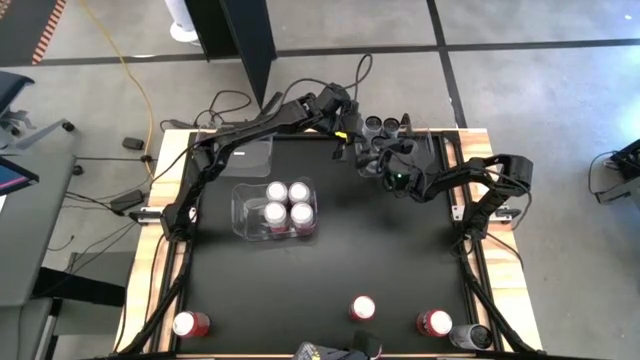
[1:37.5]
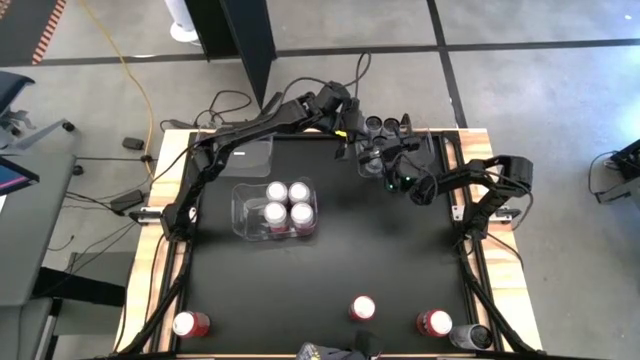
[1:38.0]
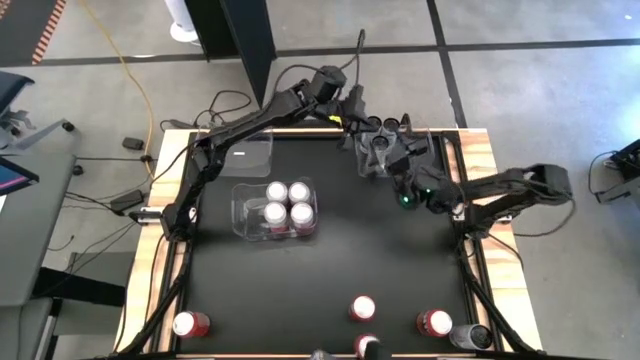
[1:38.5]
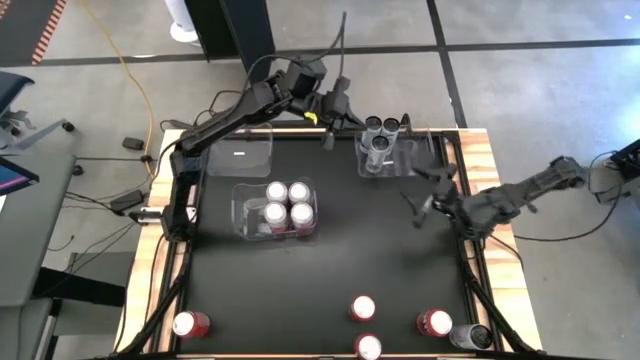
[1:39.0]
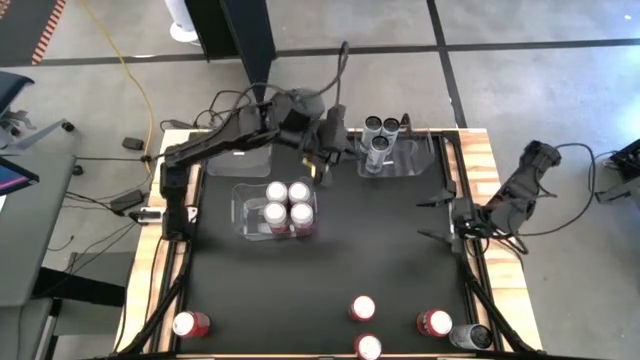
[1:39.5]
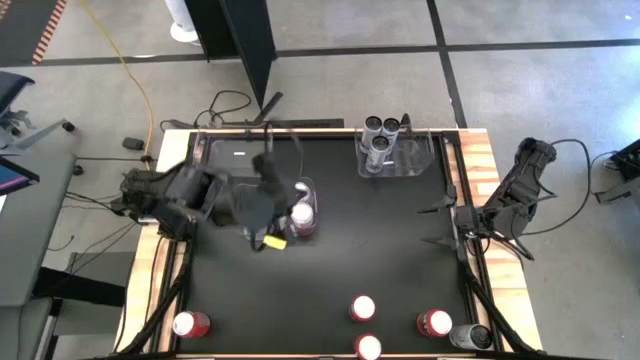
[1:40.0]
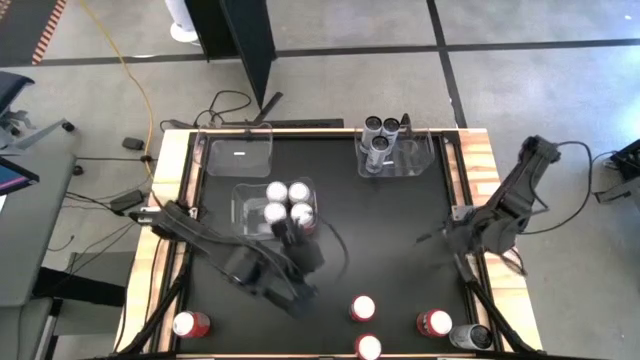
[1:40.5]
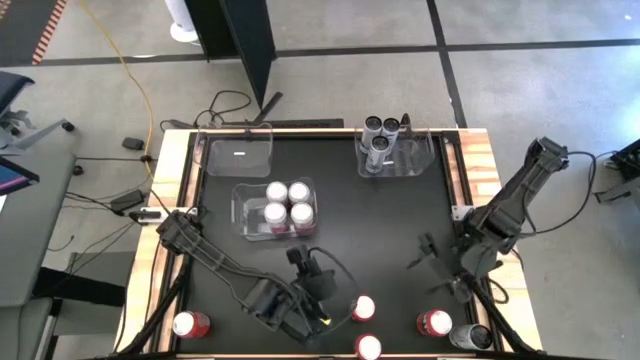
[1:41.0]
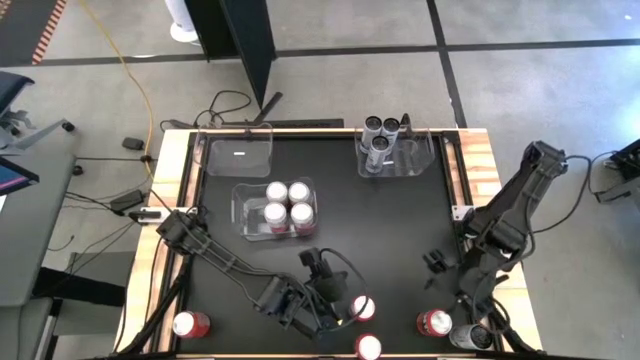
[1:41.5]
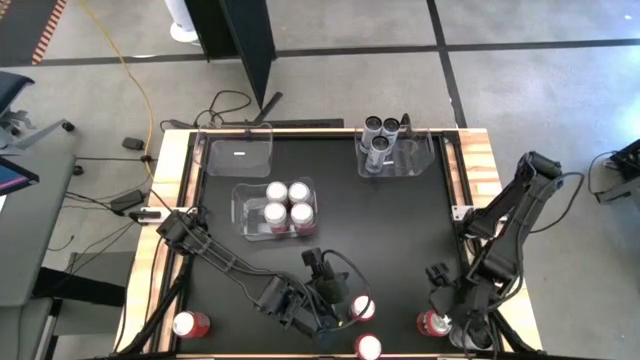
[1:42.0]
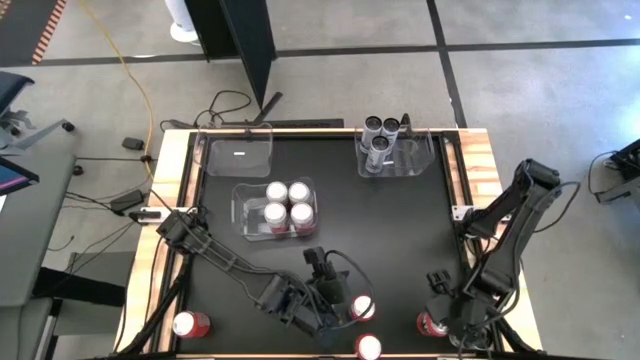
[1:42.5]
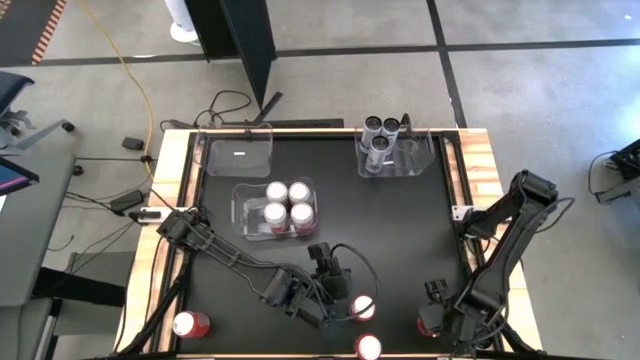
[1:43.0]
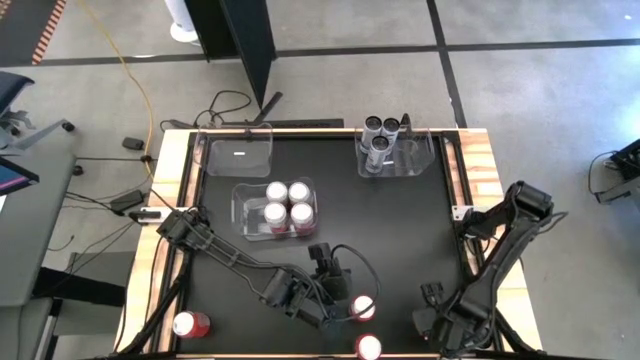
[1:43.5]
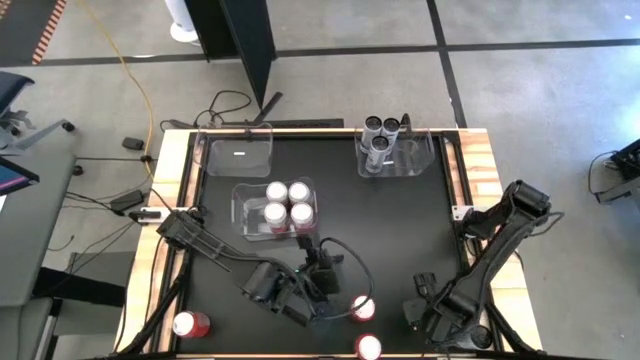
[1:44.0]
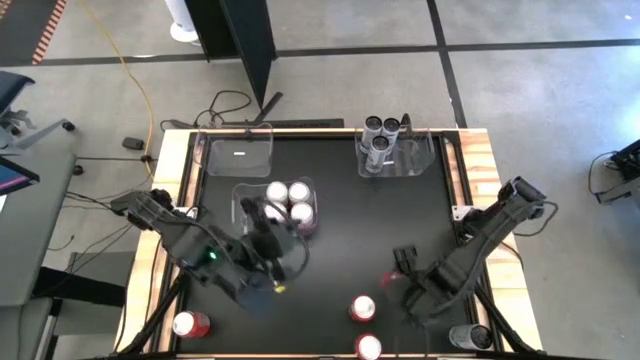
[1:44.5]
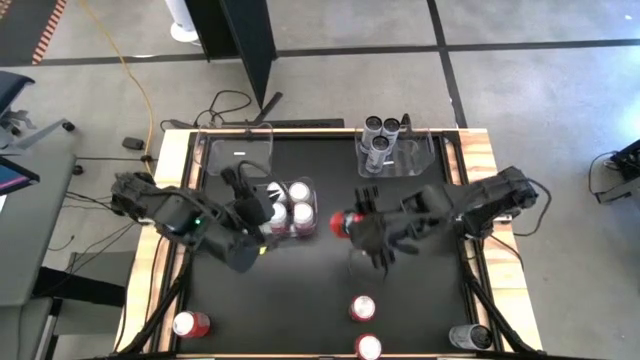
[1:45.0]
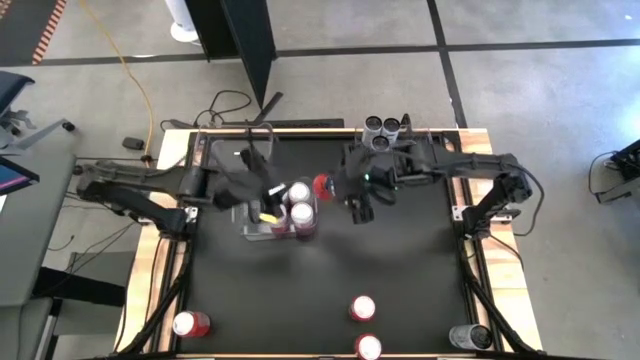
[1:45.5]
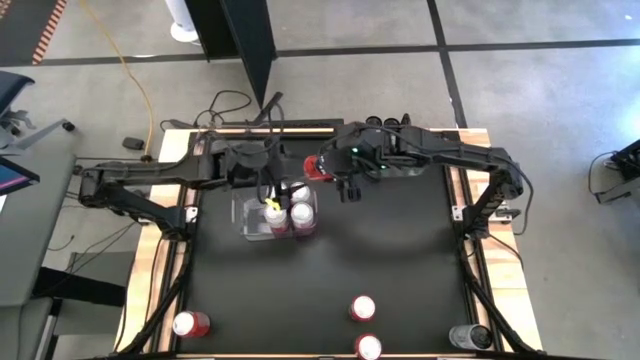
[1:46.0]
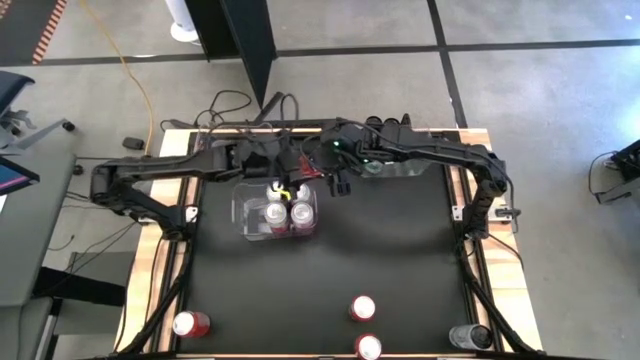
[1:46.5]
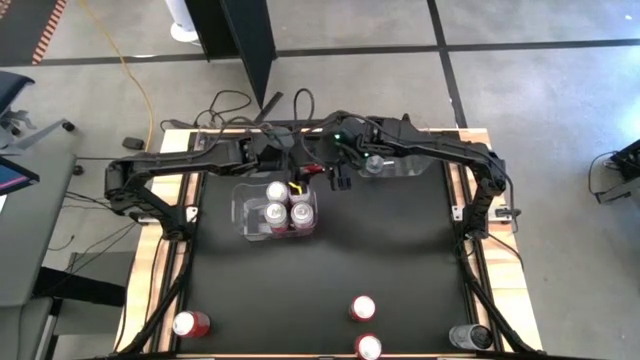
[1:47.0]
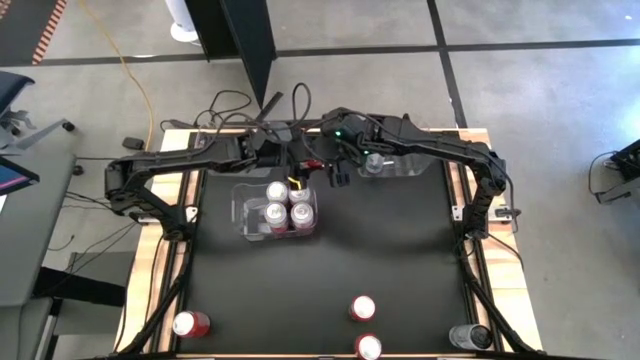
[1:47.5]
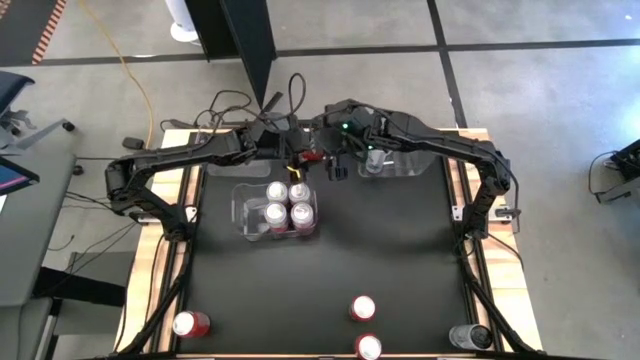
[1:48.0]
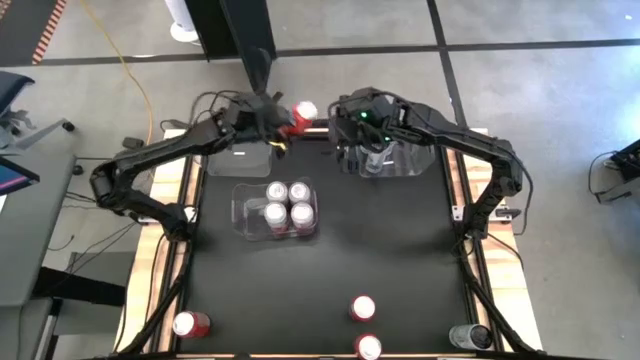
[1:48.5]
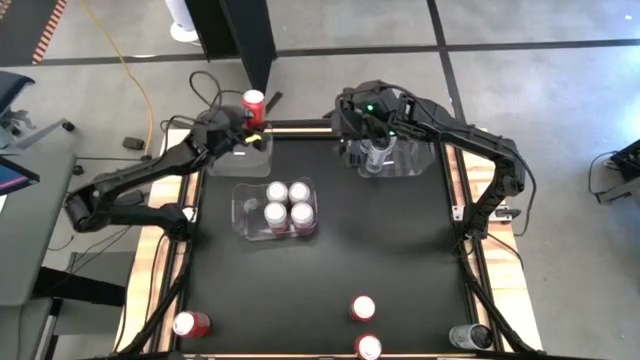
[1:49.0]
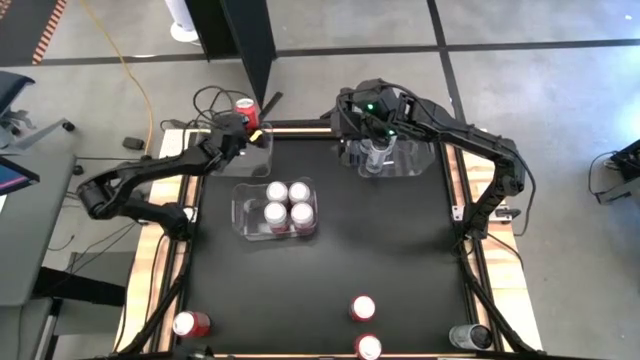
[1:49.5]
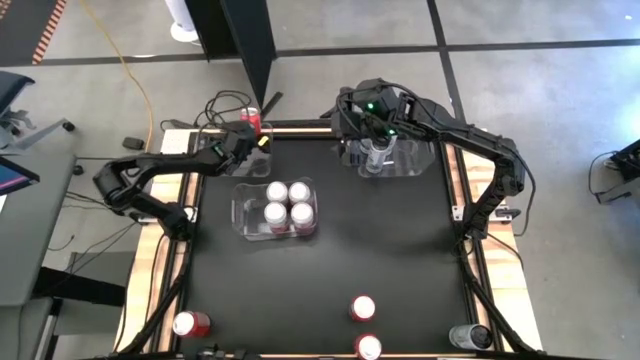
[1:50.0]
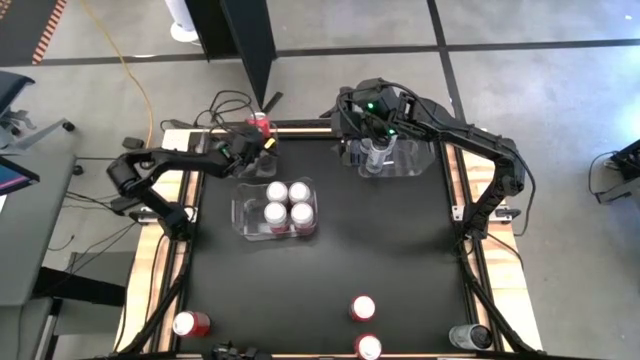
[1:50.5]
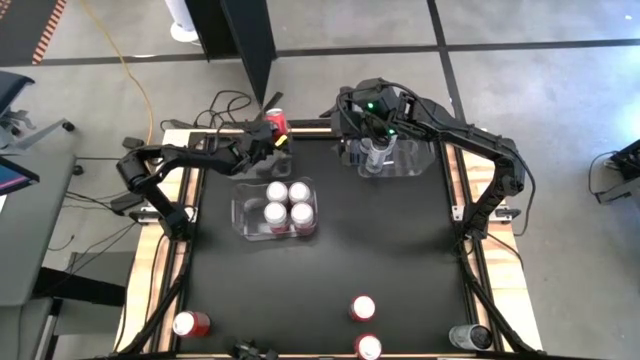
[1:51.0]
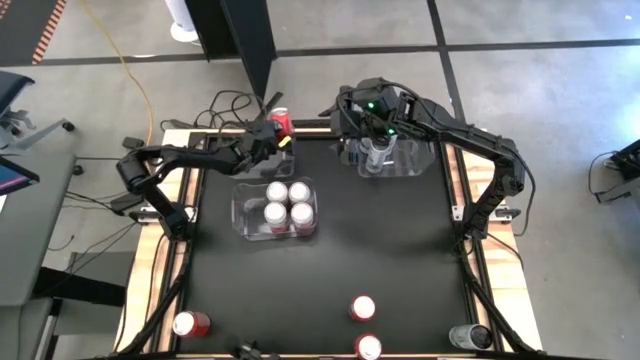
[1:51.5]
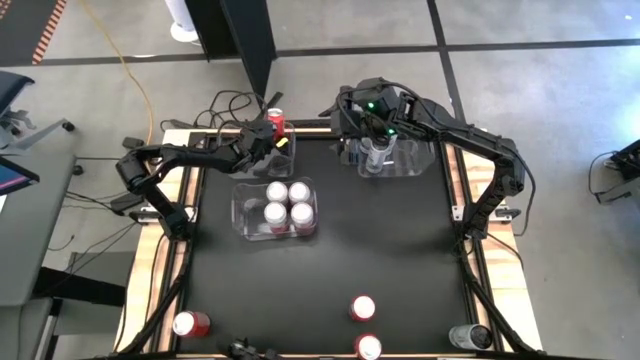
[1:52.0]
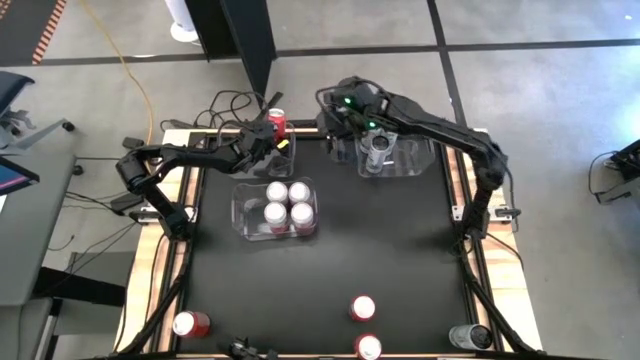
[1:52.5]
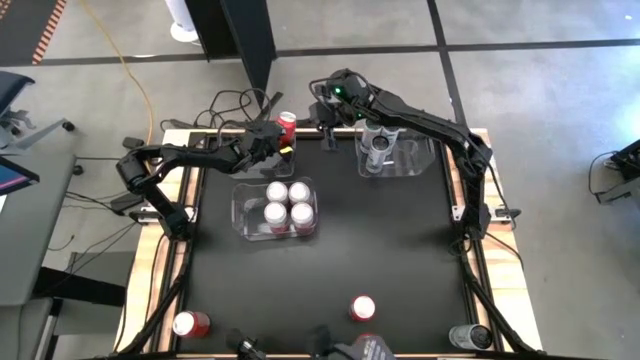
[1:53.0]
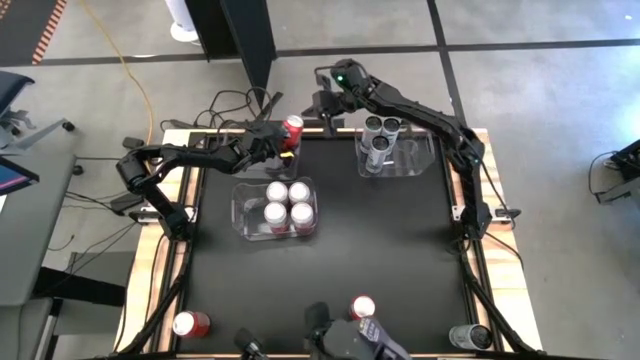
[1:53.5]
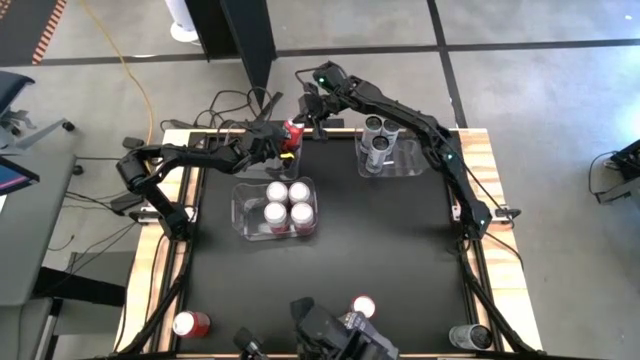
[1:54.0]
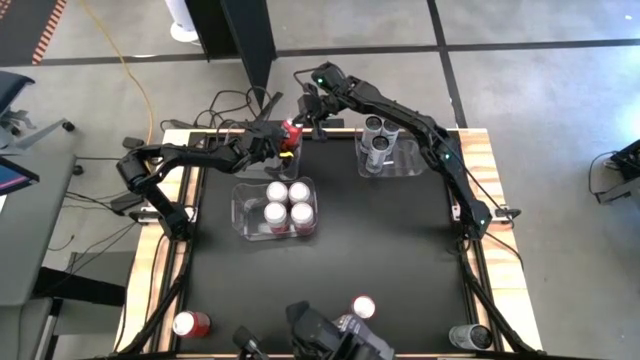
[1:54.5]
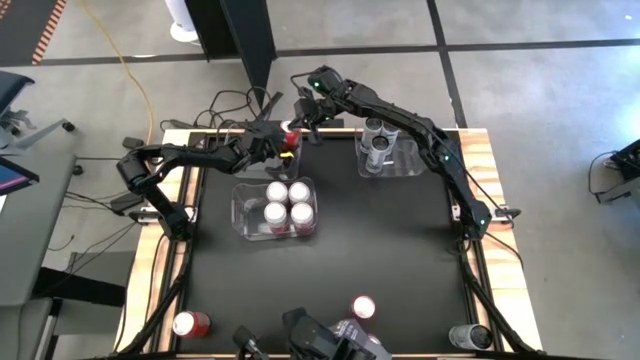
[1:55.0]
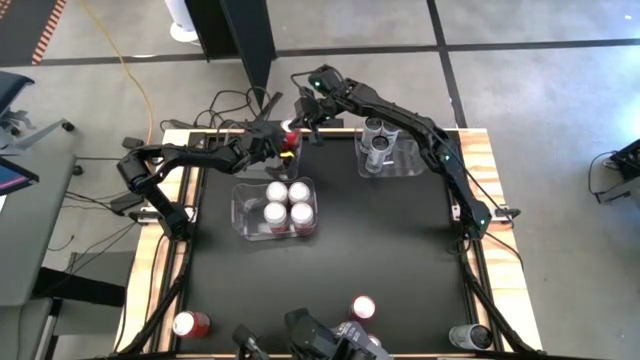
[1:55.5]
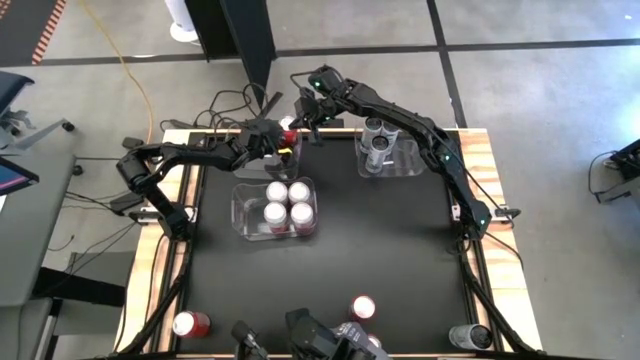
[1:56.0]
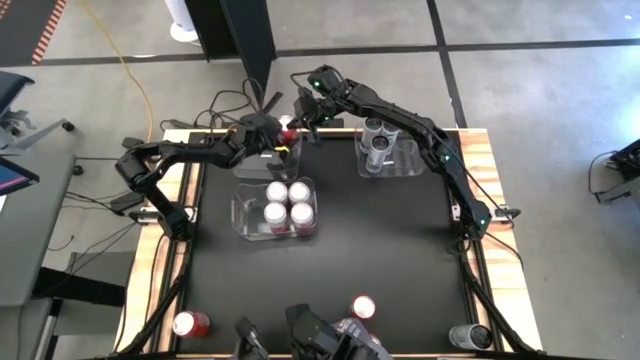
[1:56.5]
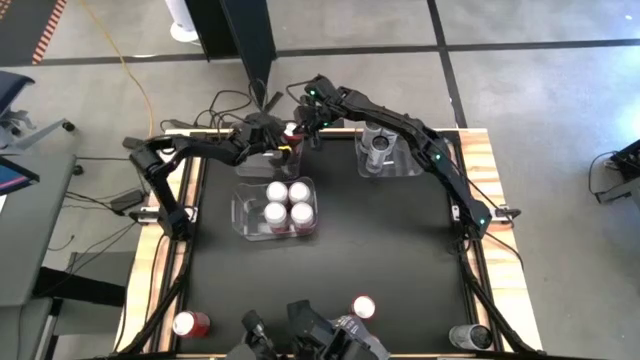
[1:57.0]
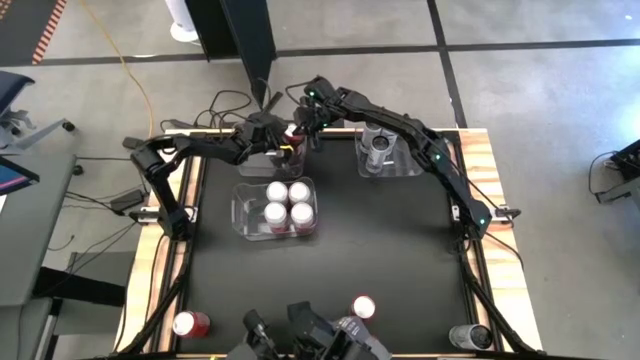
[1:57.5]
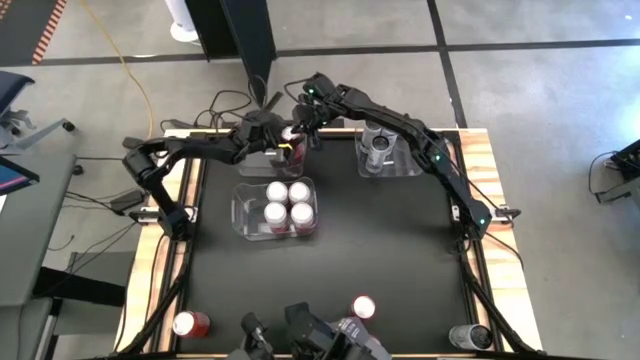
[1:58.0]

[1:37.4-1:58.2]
Task: Sort soda cans
Put the right orange soda can into the top left transparent bin

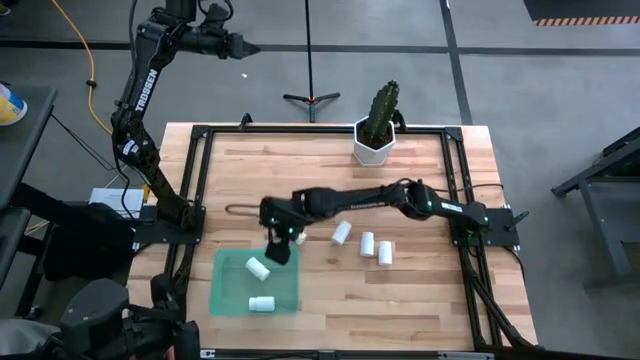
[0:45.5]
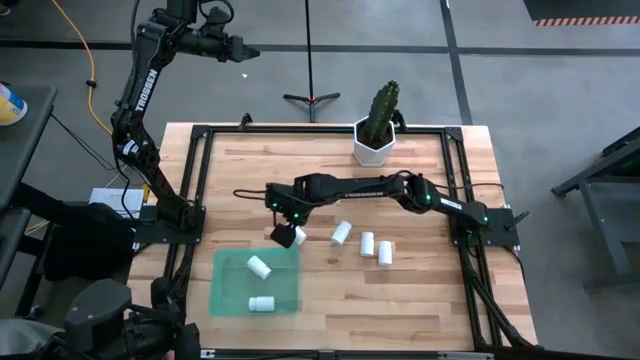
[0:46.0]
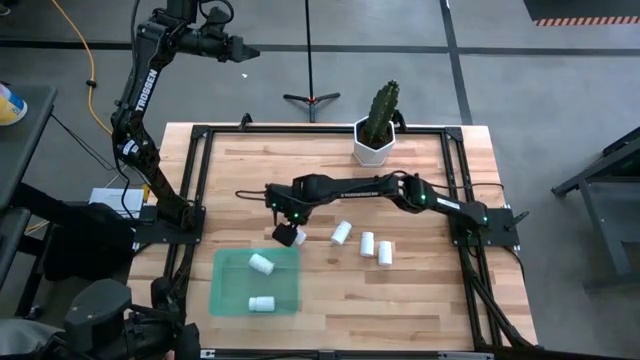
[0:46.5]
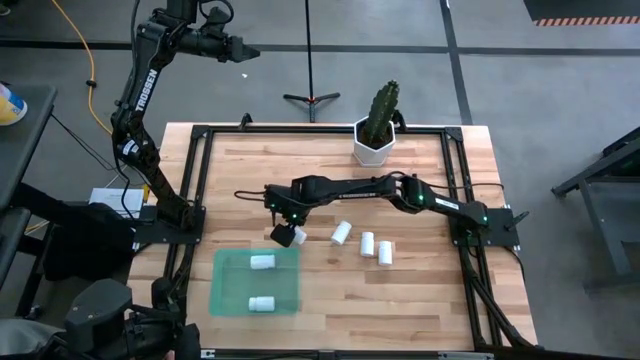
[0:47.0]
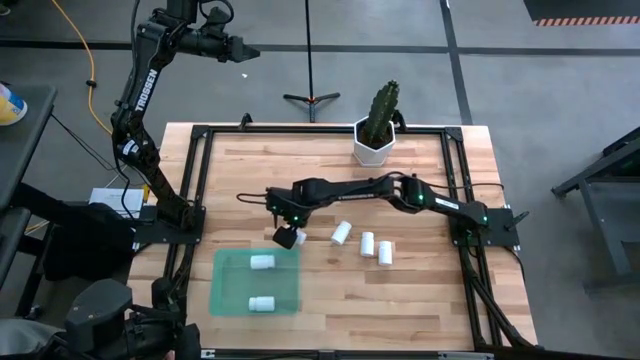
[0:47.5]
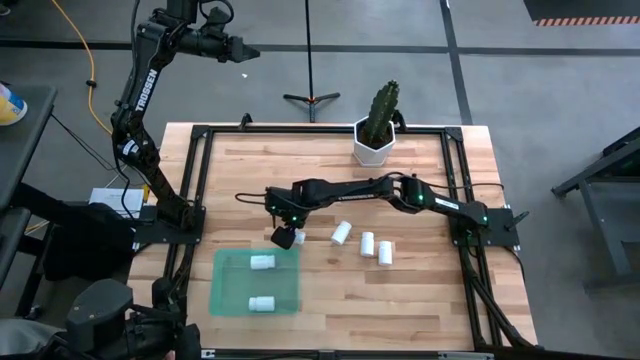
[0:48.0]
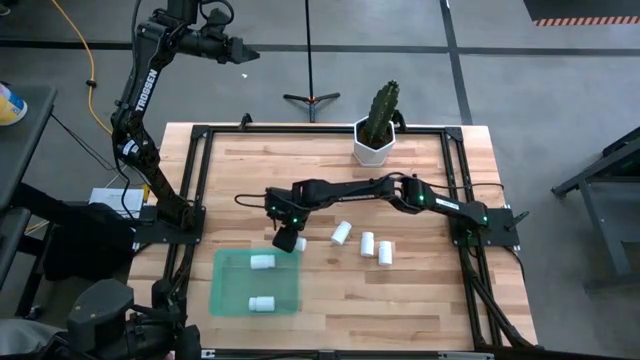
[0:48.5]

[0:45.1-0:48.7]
Task: Pick and place pill bottles into a basket
Put the white pill bottle into the green bin
